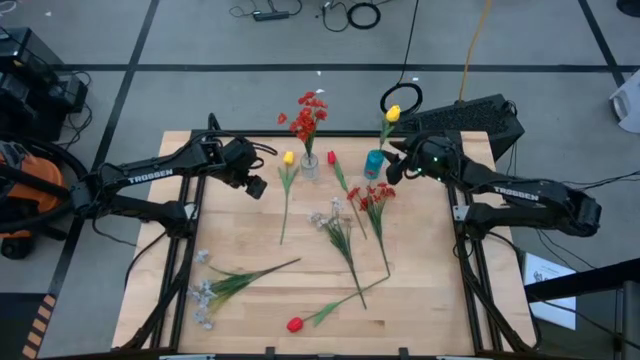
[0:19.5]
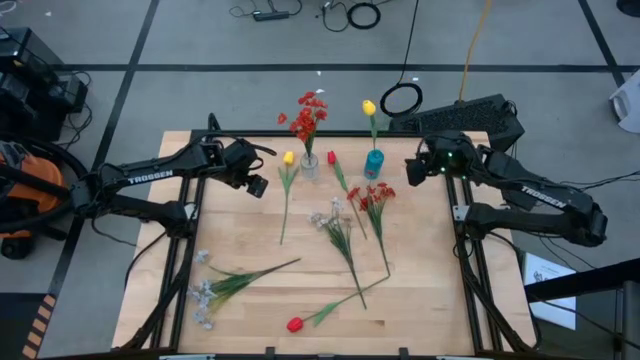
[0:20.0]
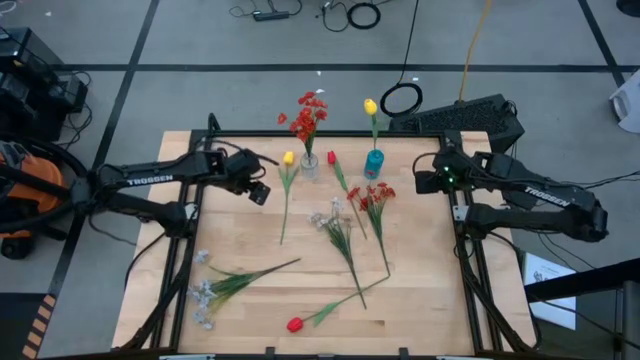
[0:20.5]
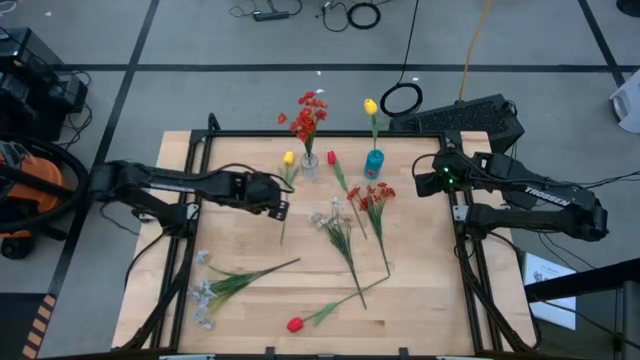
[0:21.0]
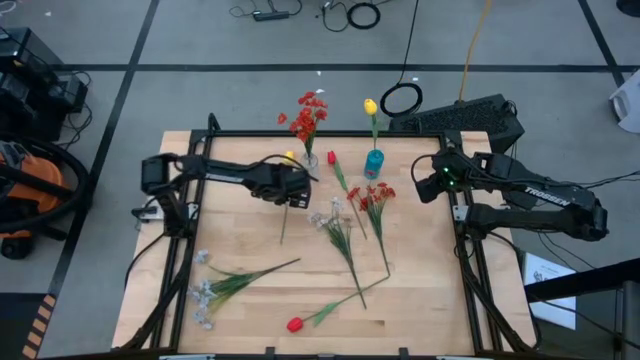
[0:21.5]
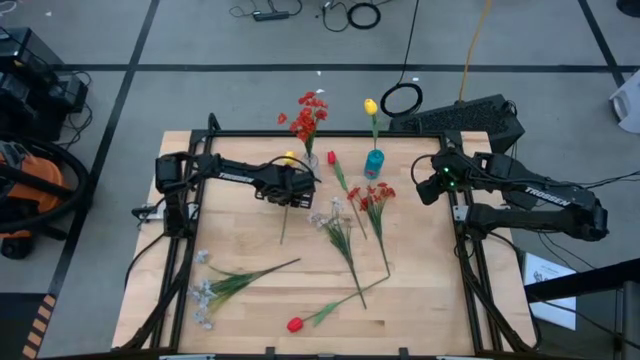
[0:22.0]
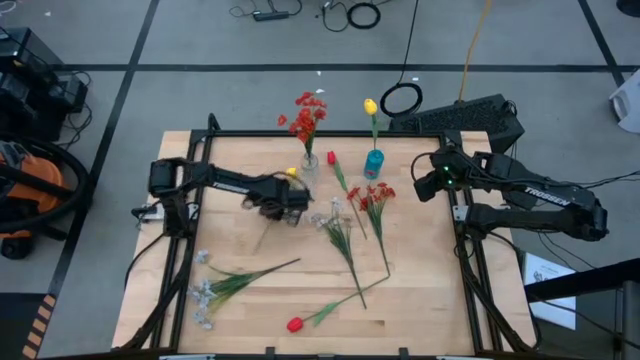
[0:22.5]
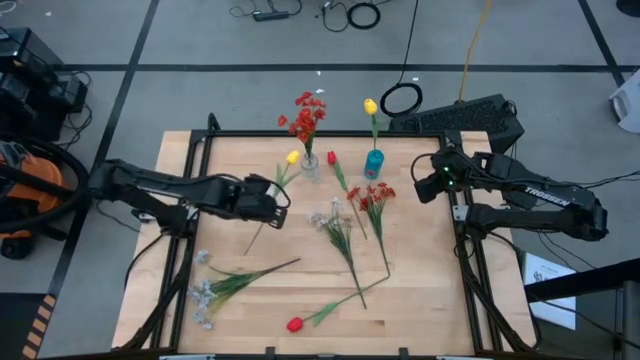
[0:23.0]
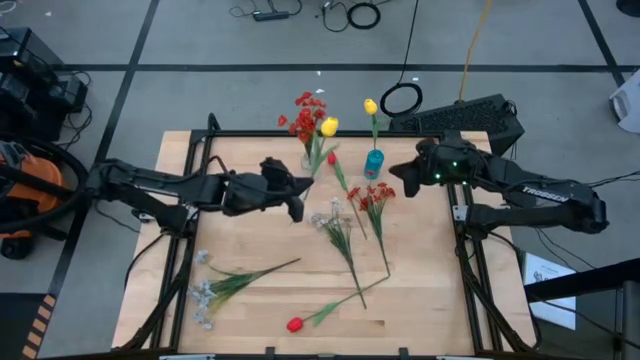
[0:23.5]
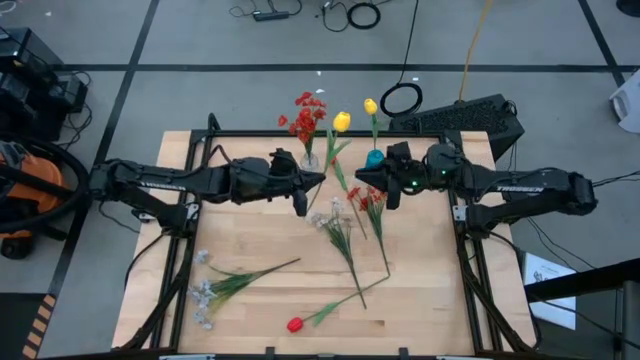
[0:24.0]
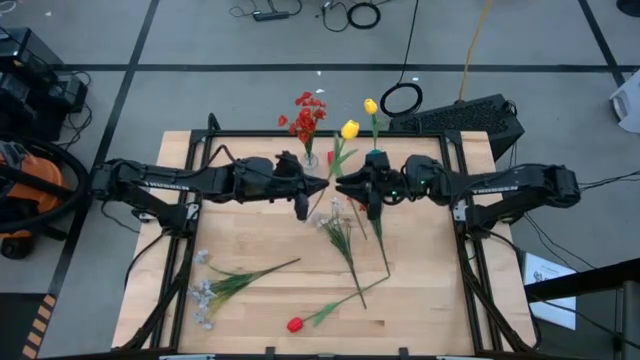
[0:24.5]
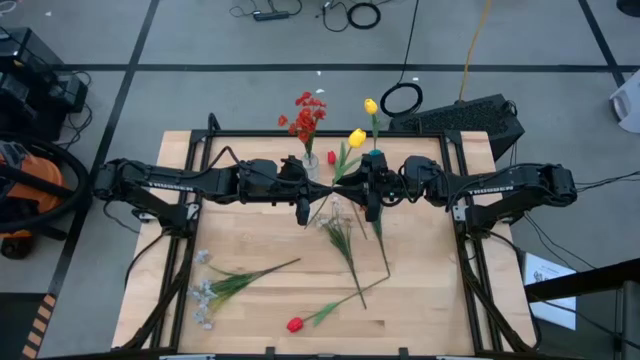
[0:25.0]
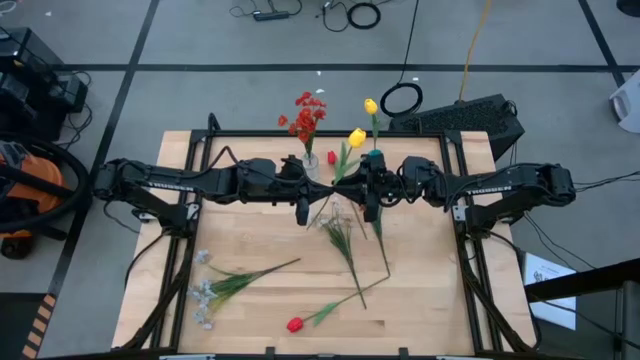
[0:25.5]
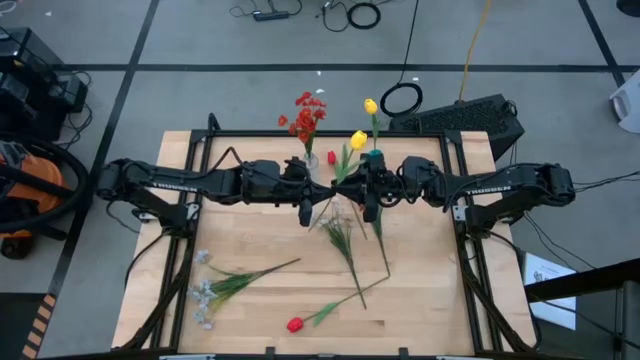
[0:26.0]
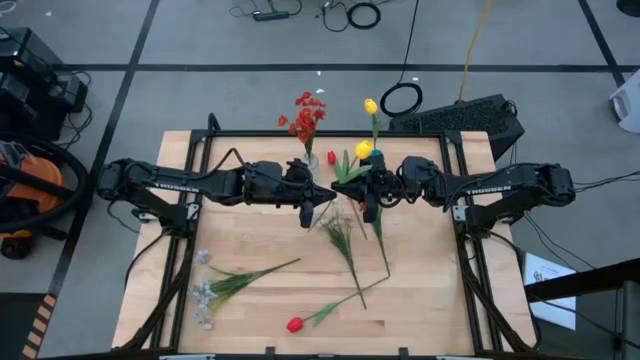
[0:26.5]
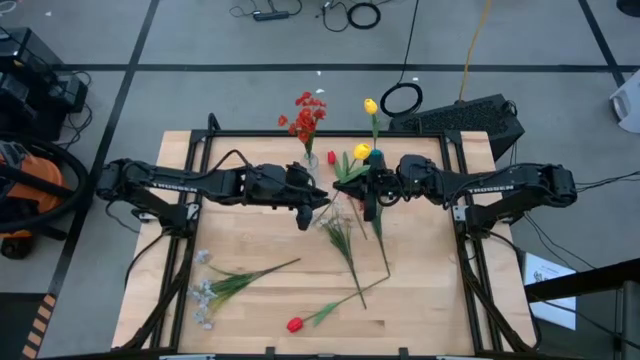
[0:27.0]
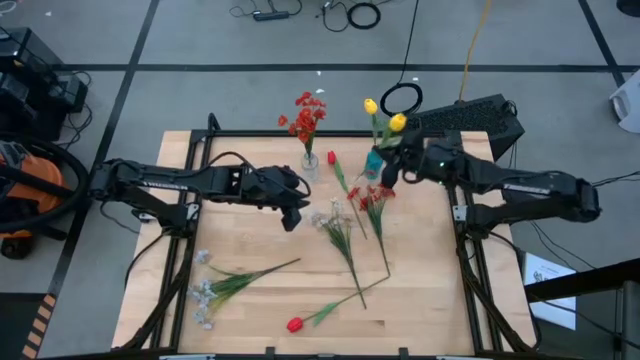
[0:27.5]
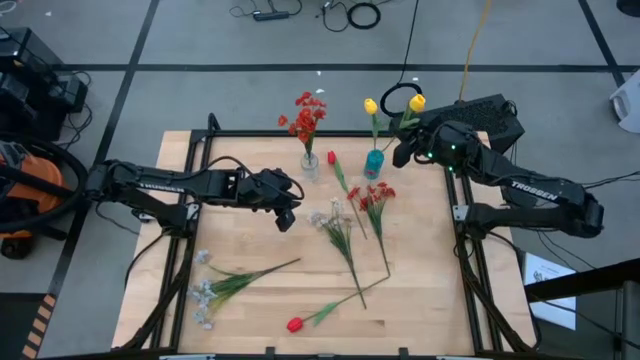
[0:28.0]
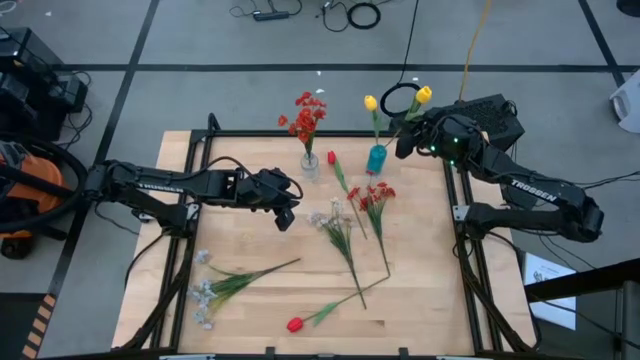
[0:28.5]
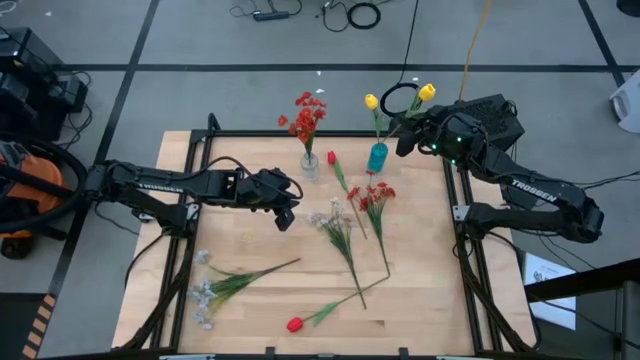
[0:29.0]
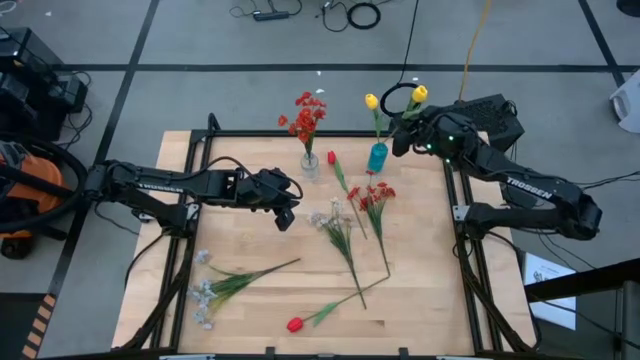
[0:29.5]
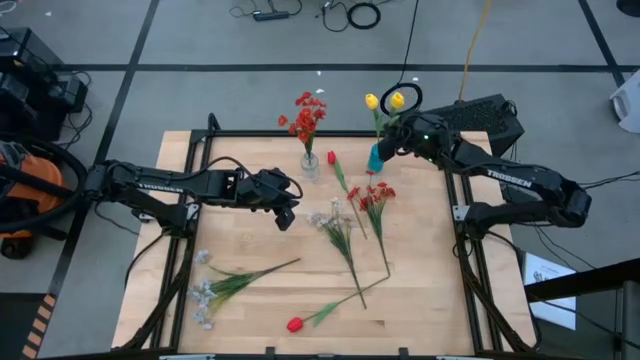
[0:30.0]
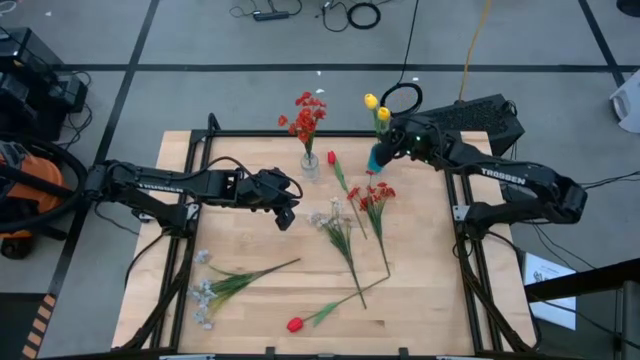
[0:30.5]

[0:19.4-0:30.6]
Task: Sort flowers into vase by color
Put the yellow tulip into the blue vase

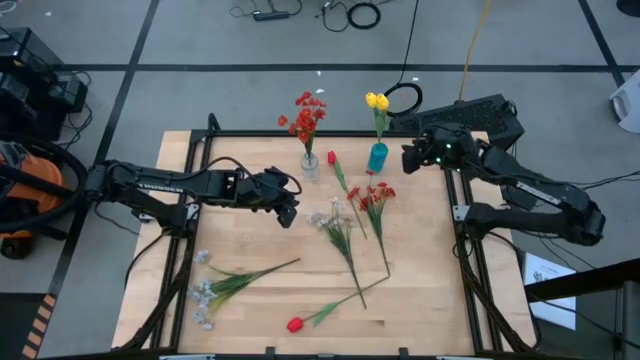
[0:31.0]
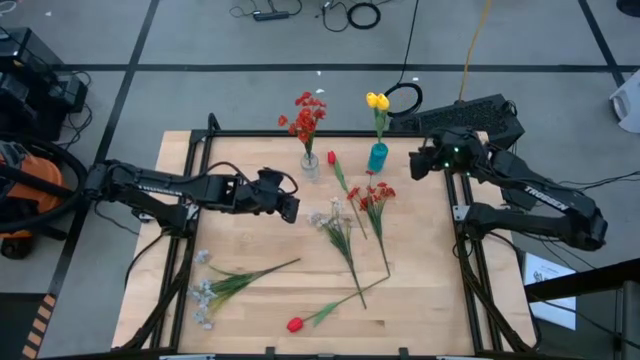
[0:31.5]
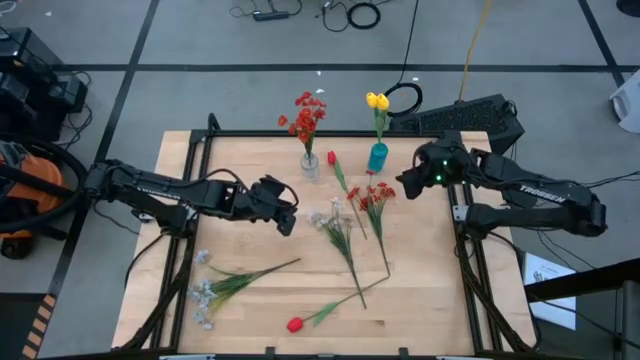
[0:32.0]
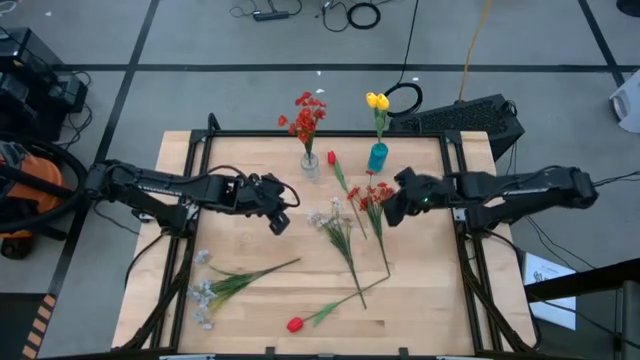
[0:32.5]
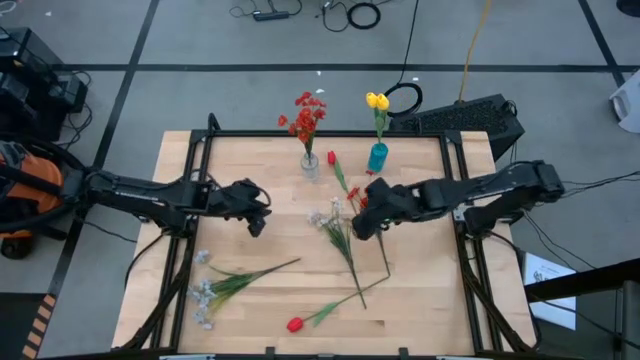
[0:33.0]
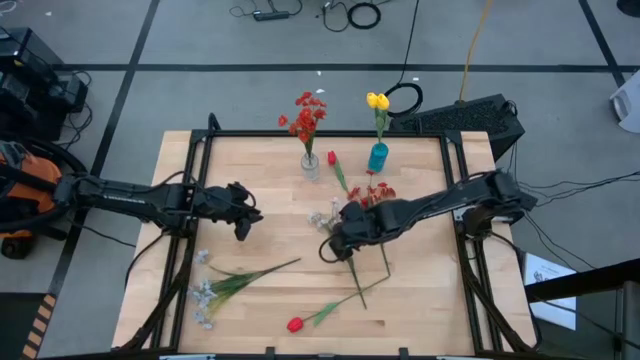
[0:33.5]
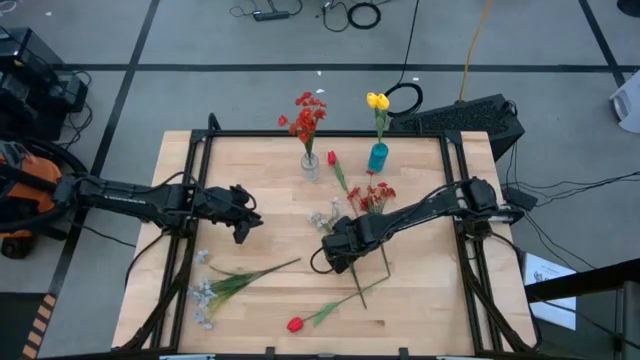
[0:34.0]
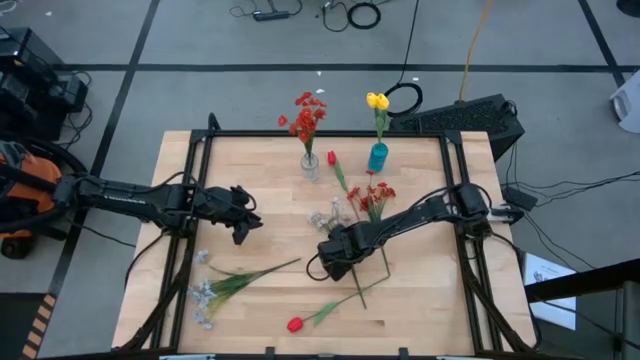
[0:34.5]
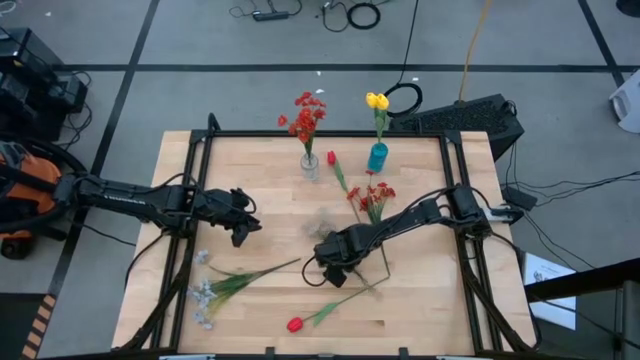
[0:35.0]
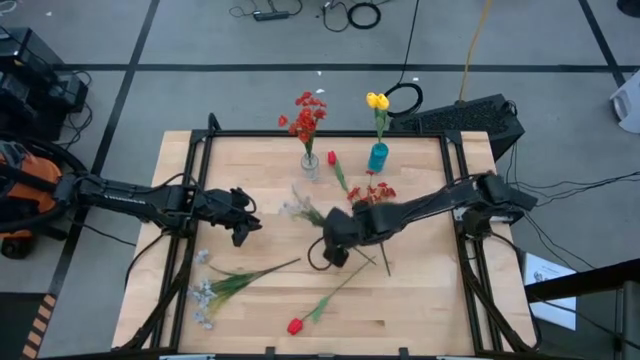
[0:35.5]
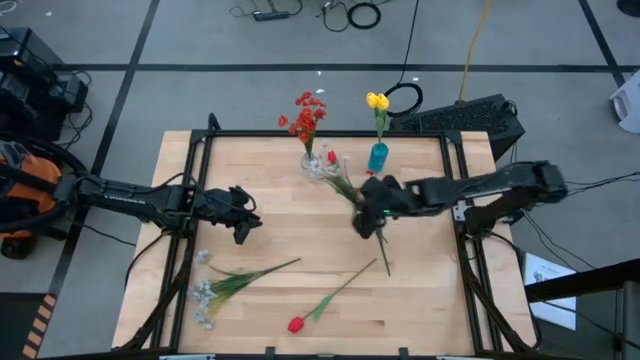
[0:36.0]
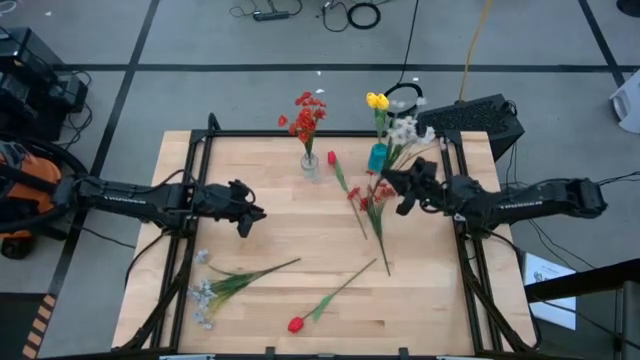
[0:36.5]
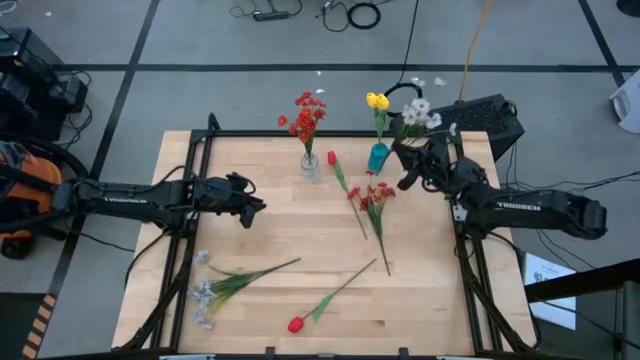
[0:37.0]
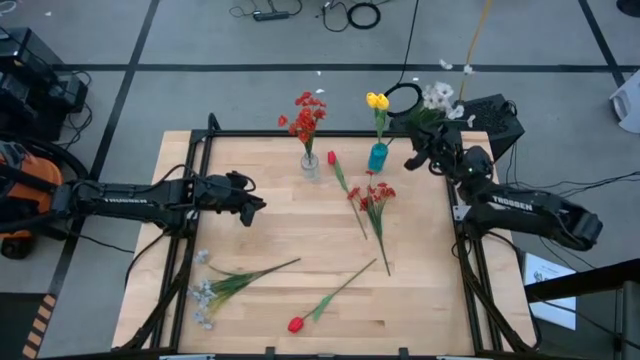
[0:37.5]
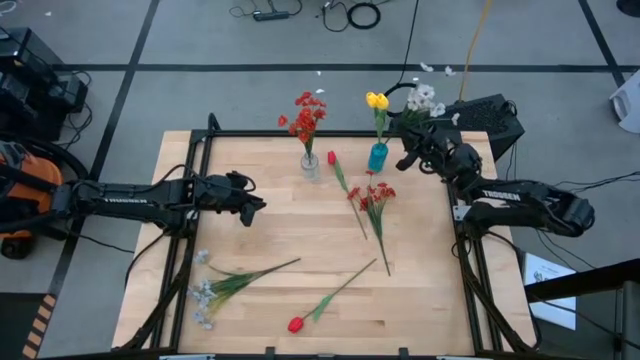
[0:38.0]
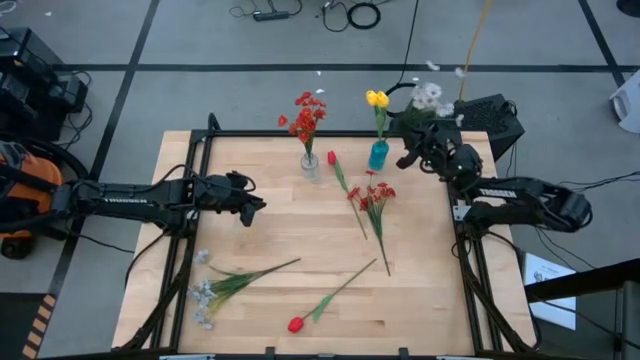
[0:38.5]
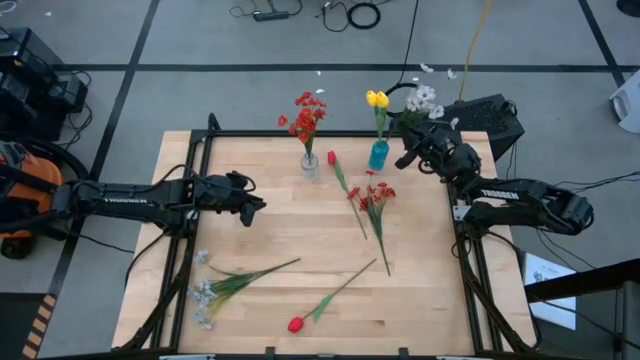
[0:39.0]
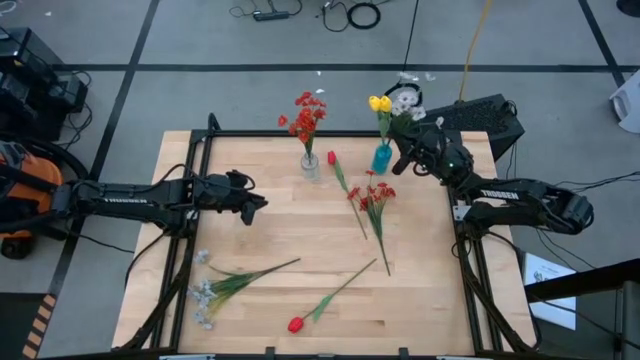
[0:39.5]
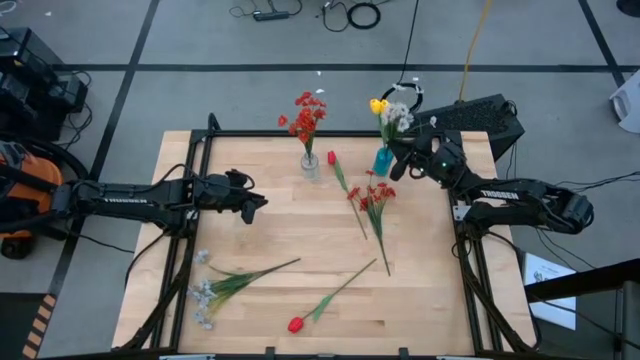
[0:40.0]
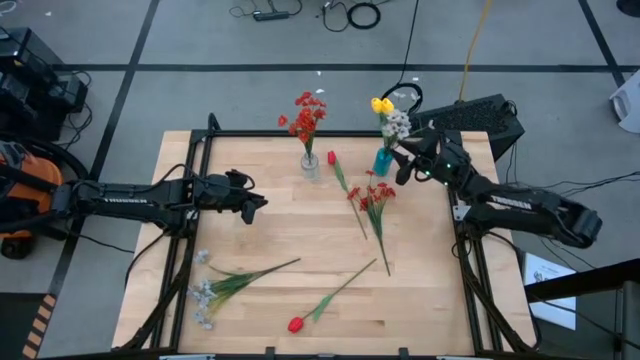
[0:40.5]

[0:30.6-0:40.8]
Put the right white flower into the blue vase

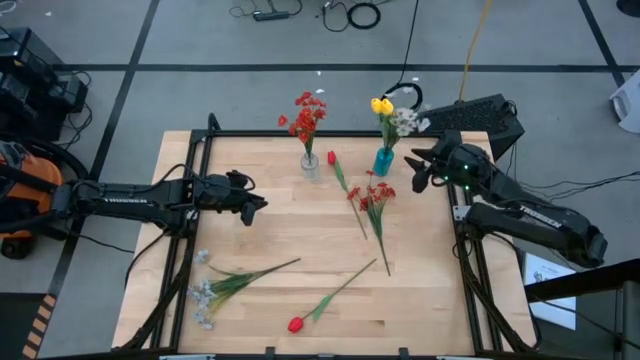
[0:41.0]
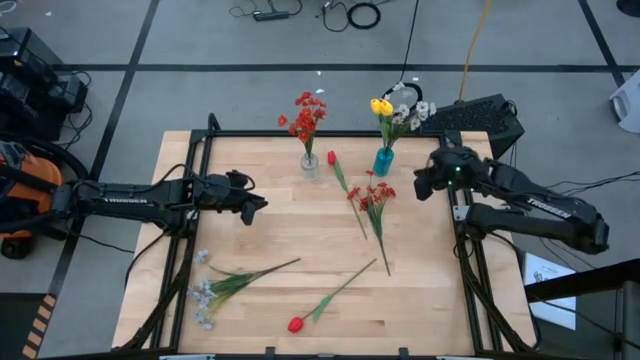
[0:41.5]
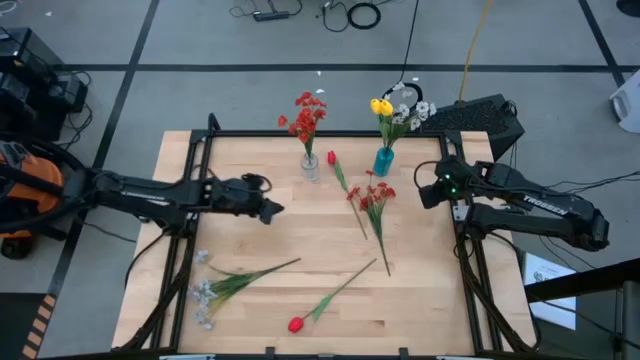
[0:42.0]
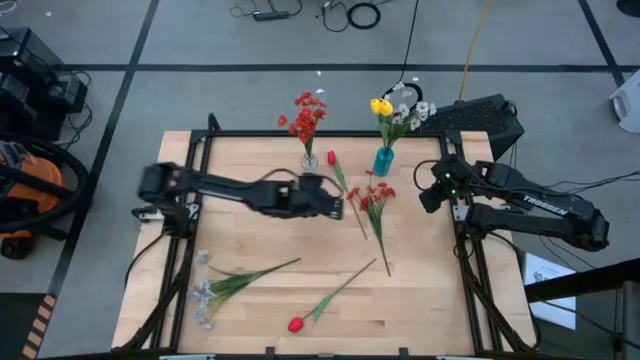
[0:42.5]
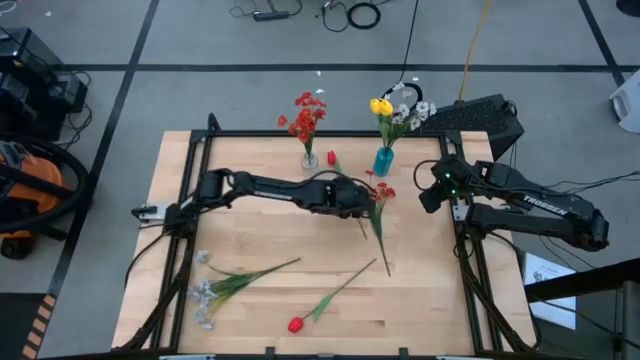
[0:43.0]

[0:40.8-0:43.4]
Put the top red tulip into the transparent vase
